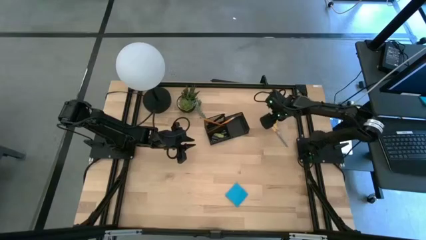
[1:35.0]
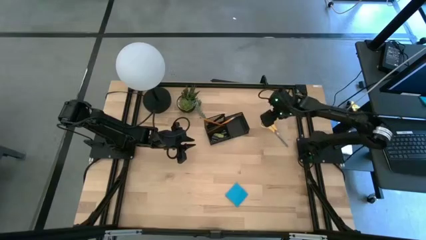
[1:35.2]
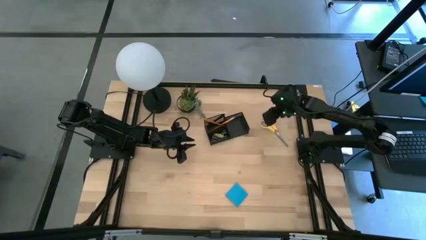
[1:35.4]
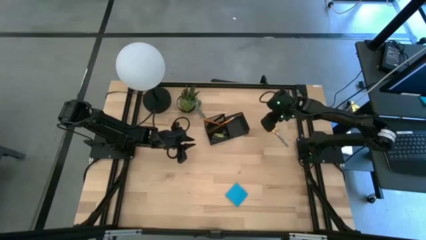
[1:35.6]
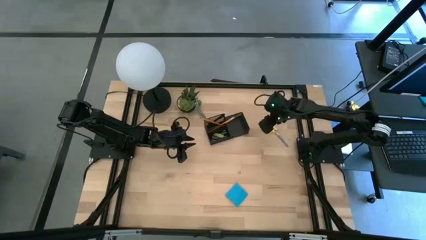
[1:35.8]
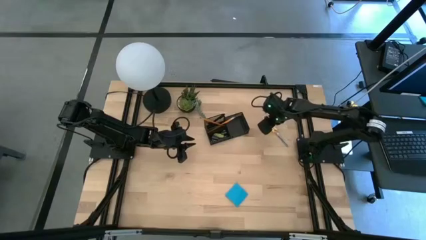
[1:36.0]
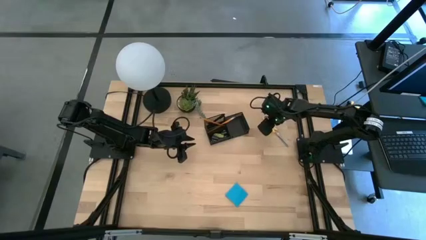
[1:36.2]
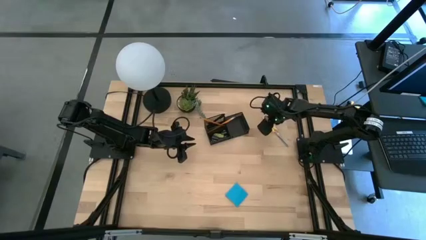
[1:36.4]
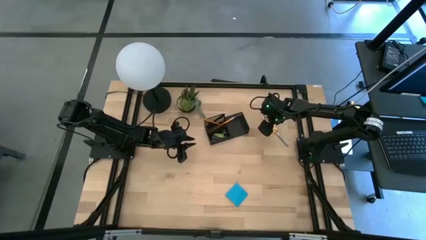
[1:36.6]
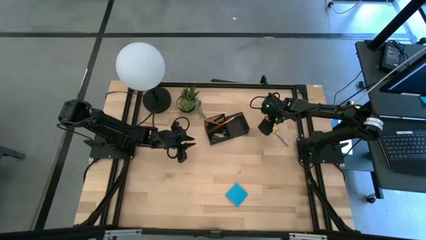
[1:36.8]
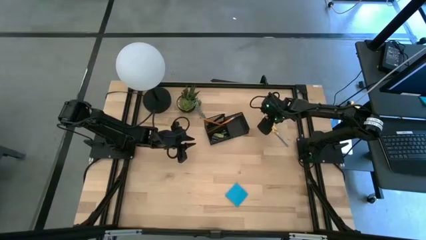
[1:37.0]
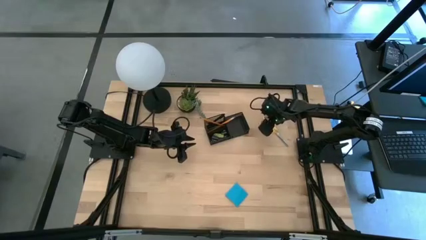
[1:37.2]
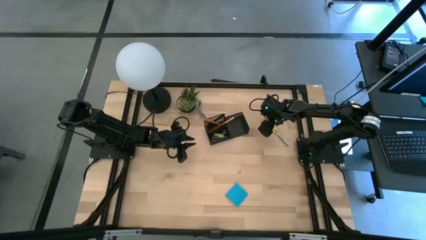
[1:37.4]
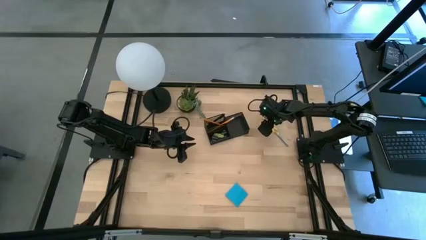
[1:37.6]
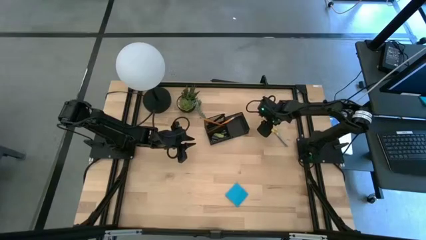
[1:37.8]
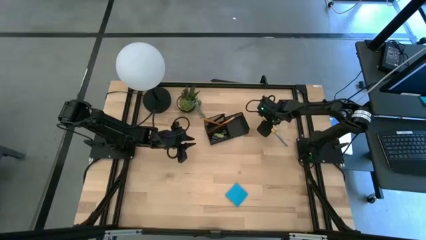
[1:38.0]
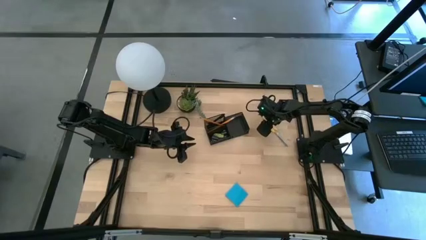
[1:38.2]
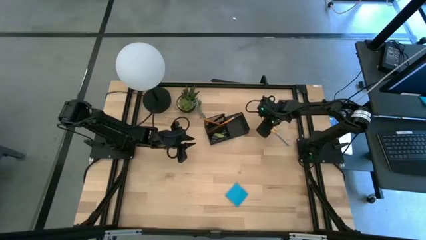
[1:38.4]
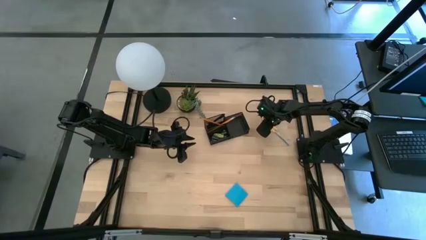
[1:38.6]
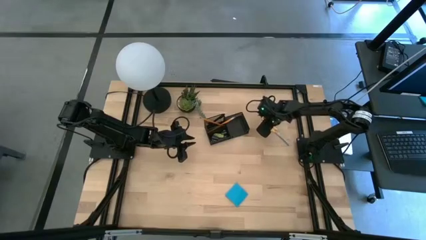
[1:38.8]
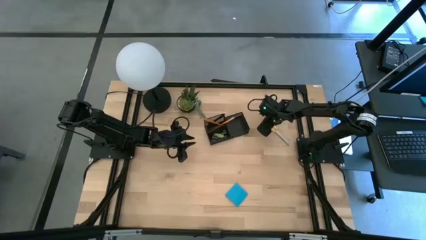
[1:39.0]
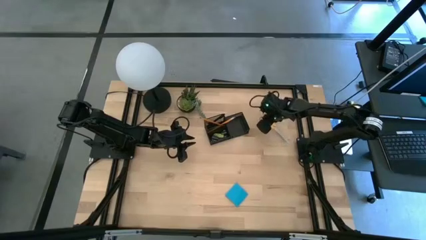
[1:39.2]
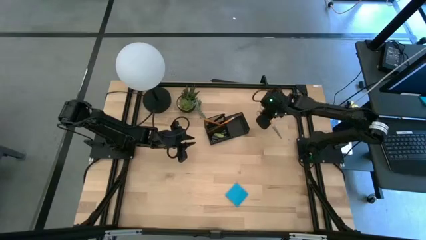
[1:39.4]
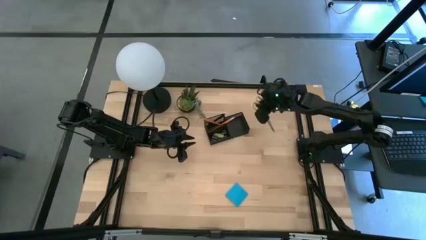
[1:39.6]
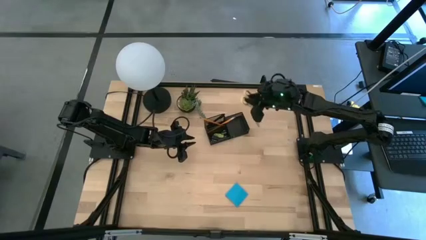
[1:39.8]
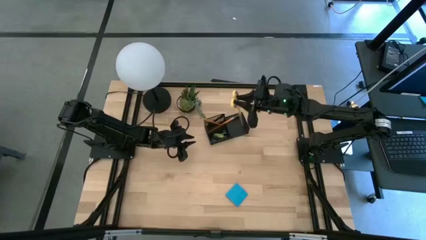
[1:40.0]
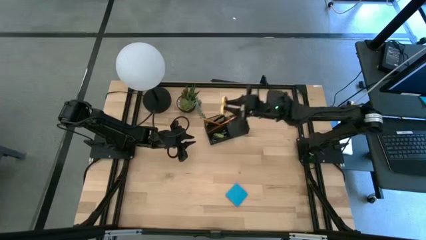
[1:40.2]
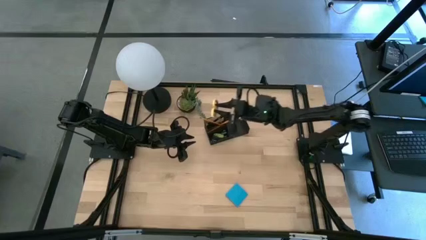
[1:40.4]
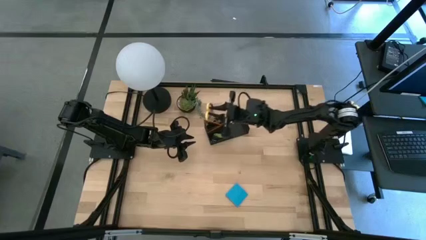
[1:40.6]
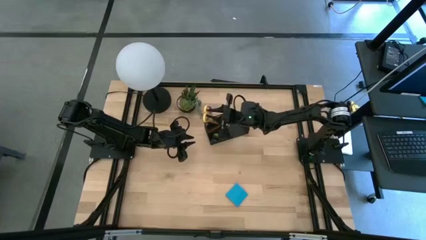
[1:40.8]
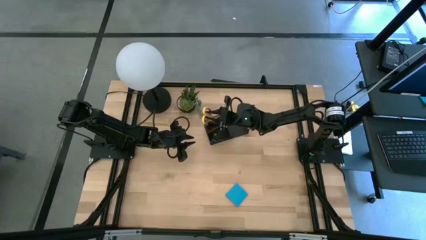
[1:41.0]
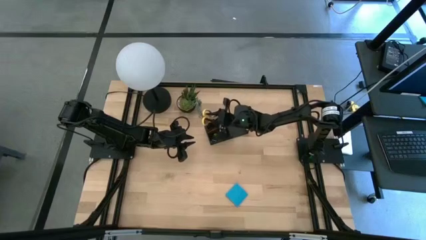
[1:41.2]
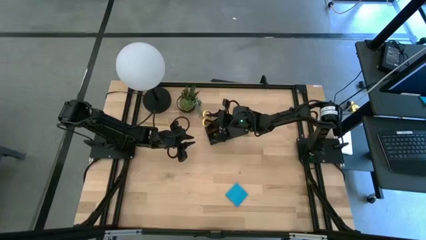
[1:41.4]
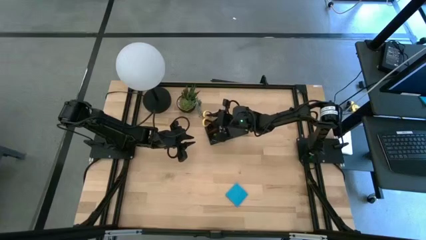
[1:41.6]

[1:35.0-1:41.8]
Task: Pick and place office supplies into organizer
Put the yellow scissors into the desk organizer

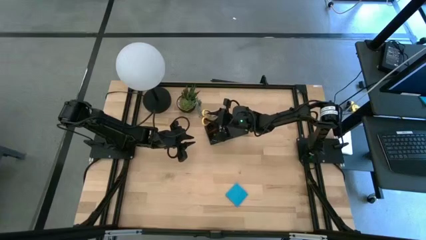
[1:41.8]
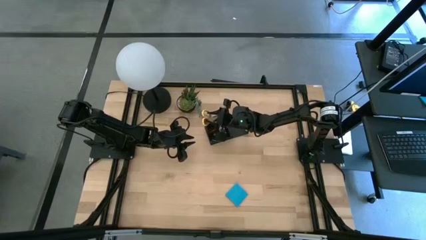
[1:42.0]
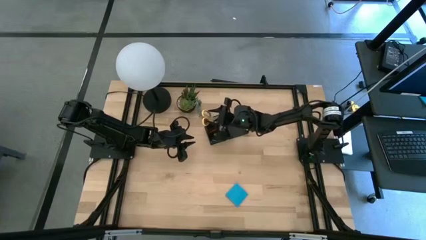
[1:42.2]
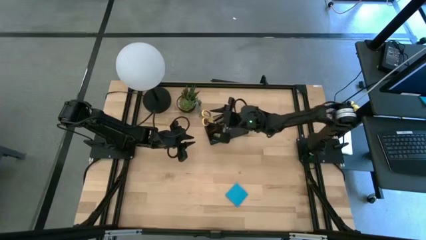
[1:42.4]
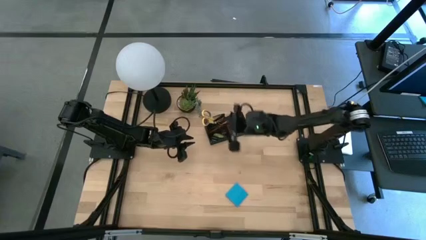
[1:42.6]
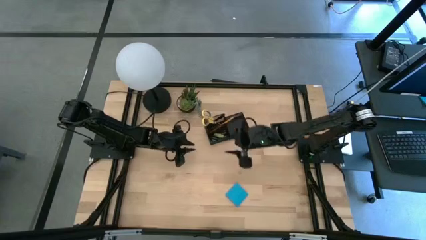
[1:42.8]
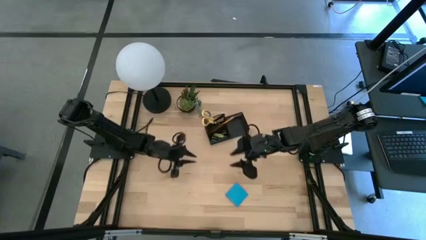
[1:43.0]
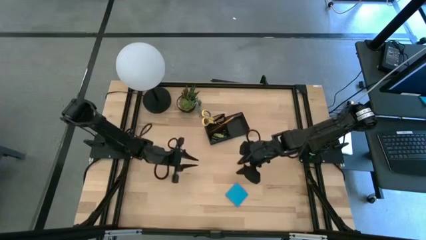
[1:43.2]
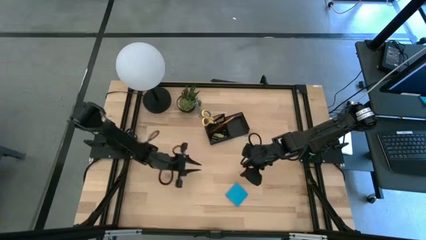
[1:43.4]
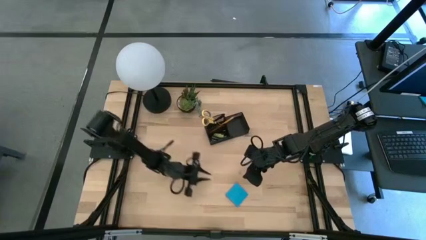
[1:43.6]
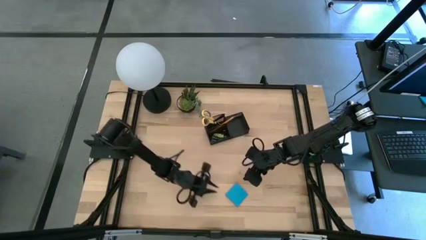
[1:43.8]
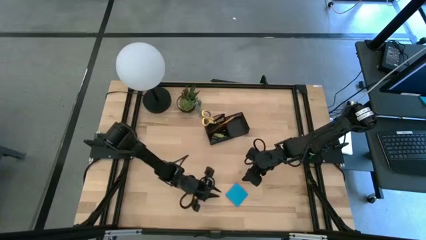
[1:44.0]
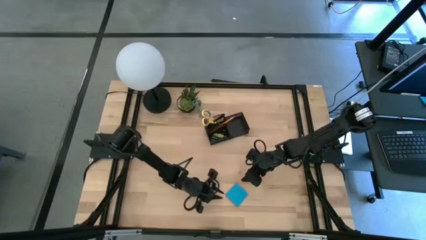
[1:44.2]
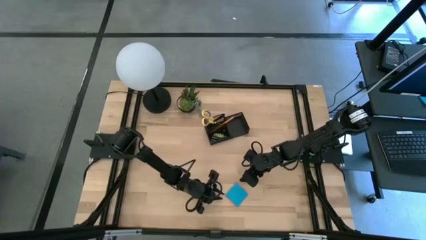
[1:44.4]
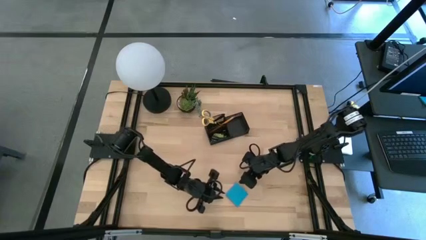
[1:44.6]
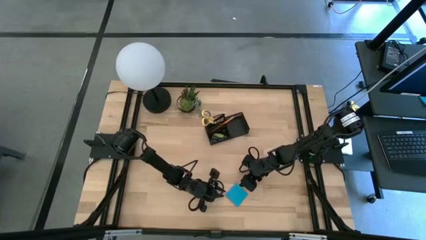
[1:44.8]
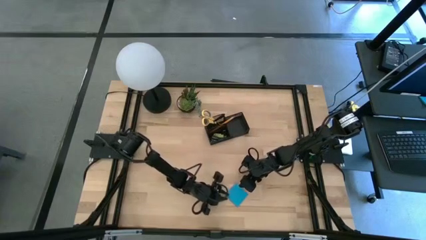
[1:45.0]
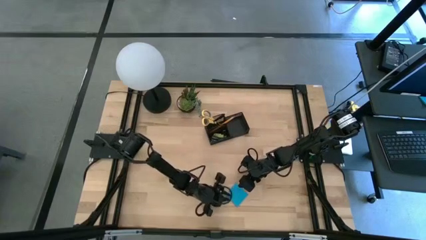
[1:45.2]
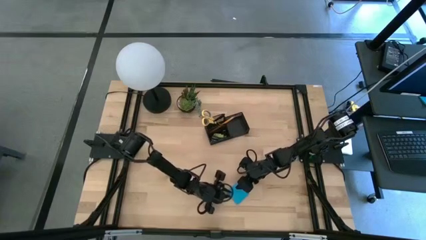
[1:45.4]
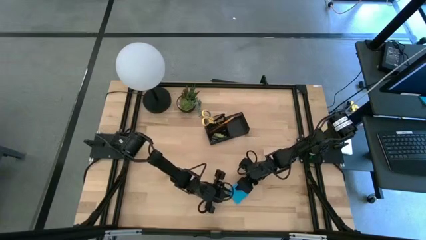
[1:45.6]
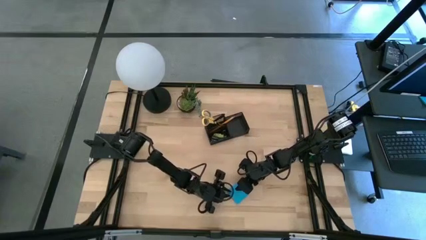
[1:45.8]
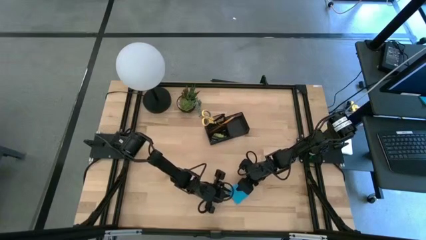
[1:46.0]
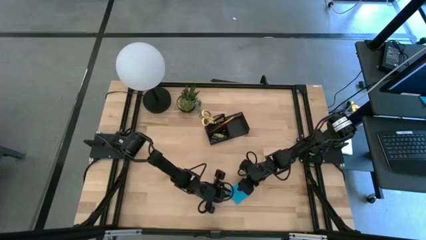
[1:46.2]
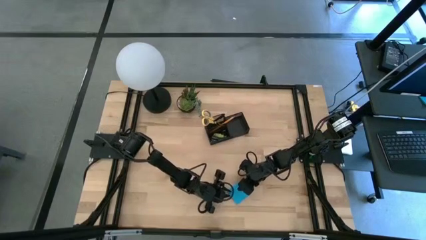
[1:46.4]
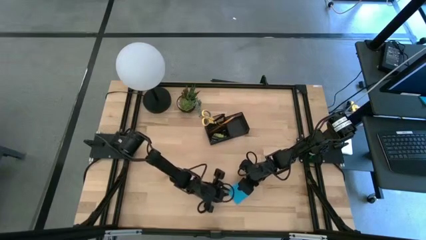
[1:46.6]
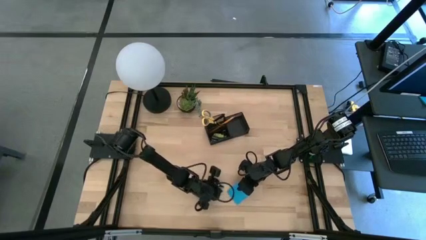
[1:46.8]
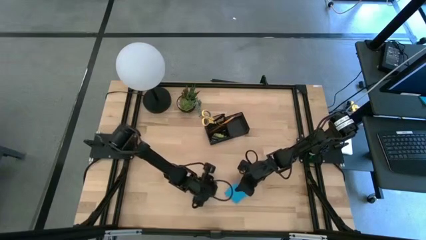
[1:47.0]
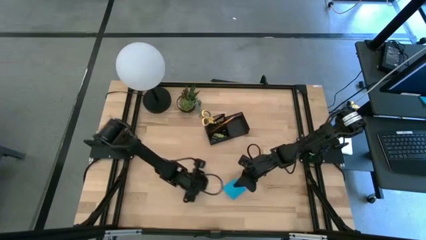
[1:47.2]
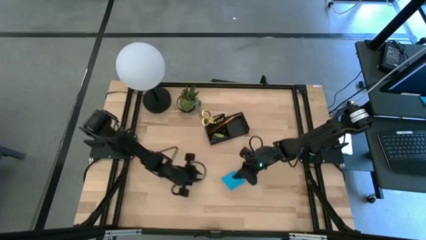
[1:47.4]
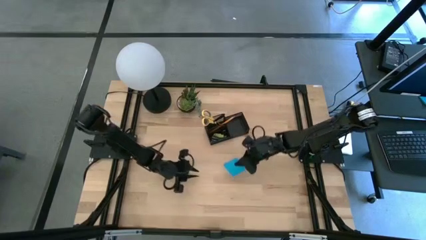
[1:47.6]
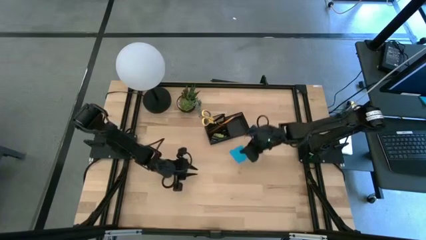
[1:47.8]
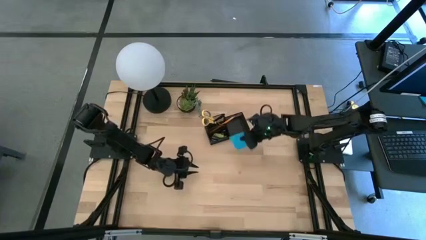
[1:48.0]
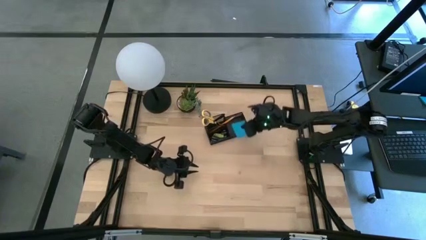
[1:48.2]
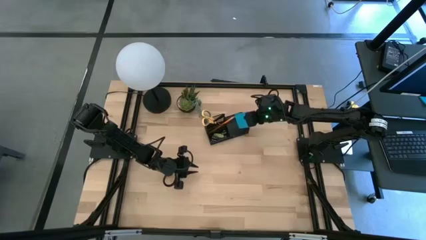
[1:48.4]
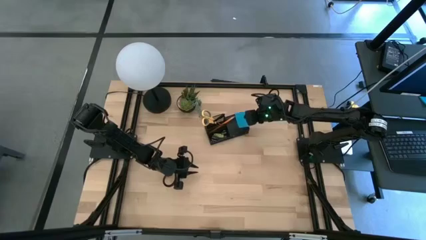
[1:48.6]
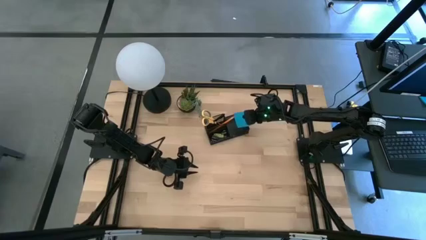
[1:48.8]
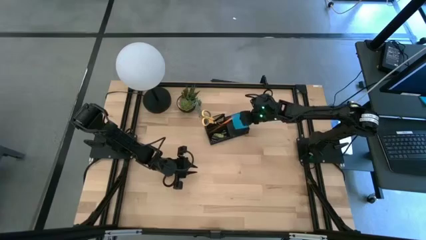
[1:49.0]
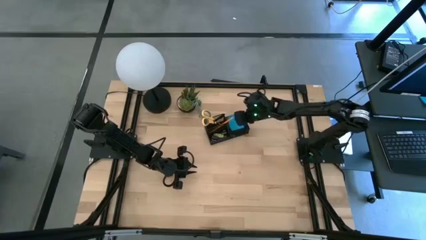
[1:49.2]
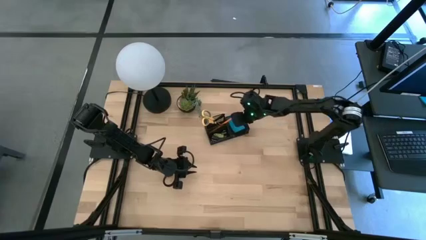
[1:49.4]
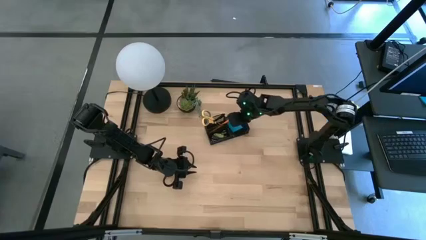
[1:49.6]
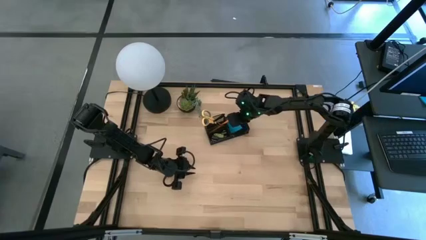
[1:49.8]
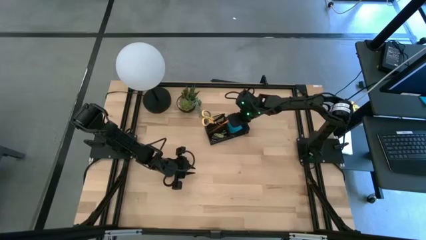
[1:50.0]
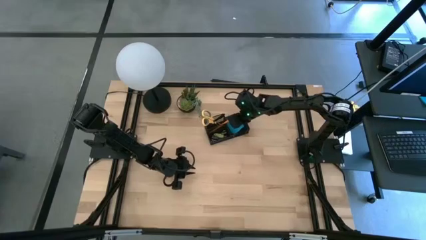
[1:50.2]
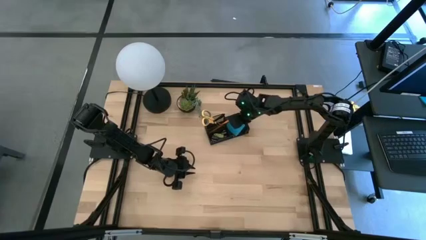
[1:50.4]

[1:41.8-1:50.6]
Put the blue sticky notes into the desk organizer
